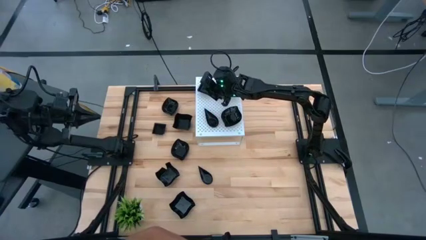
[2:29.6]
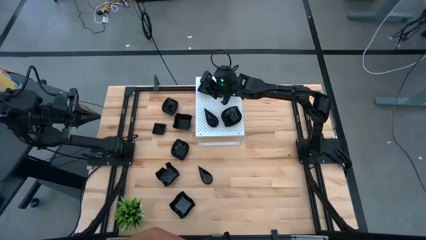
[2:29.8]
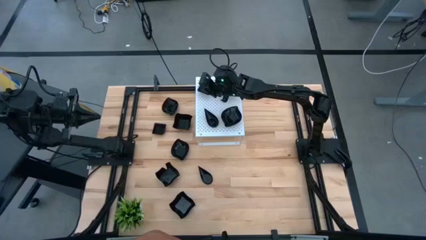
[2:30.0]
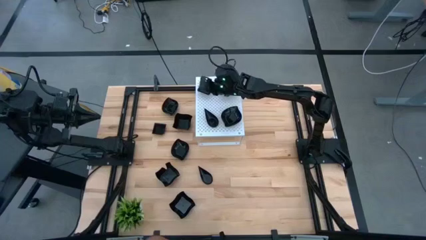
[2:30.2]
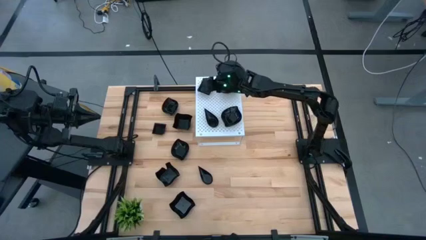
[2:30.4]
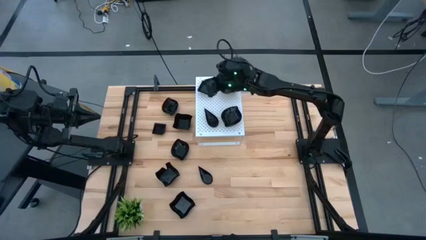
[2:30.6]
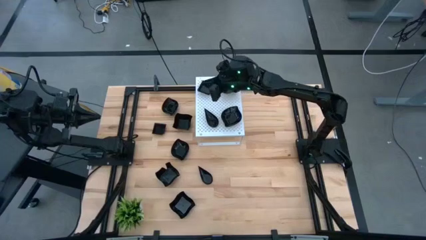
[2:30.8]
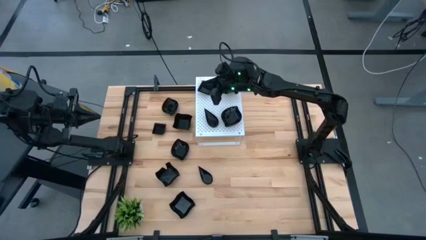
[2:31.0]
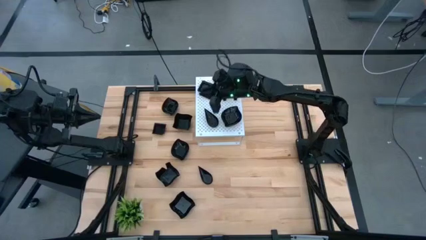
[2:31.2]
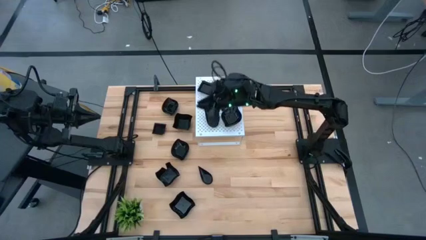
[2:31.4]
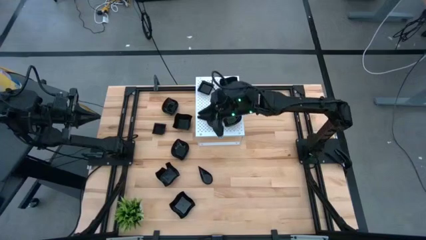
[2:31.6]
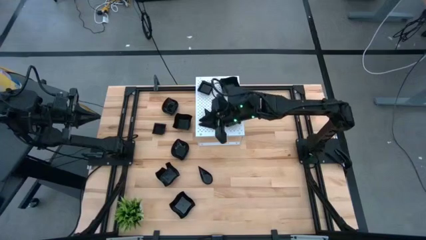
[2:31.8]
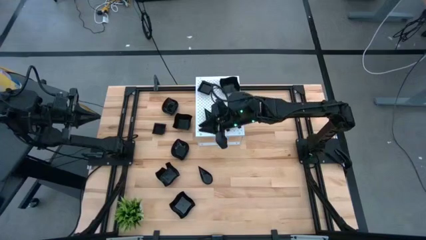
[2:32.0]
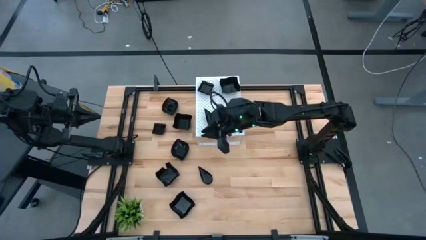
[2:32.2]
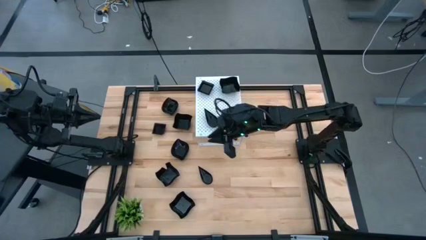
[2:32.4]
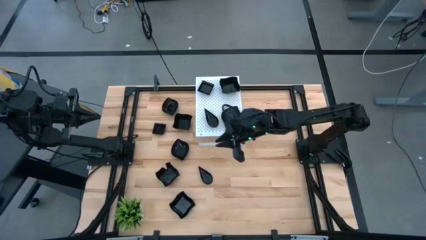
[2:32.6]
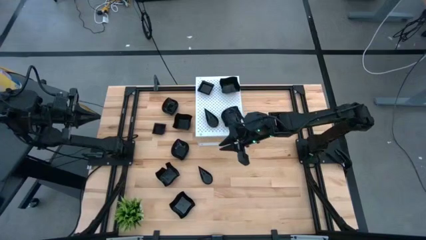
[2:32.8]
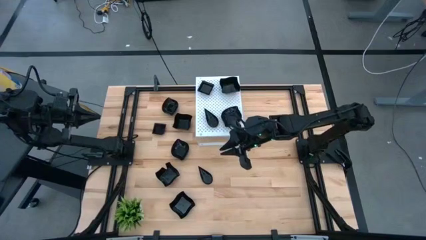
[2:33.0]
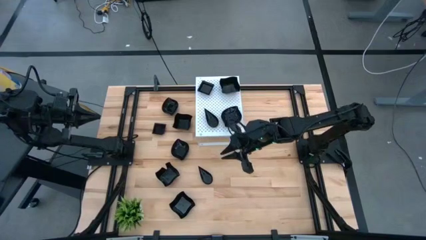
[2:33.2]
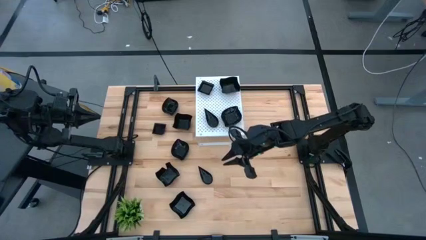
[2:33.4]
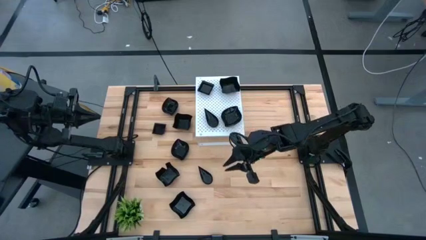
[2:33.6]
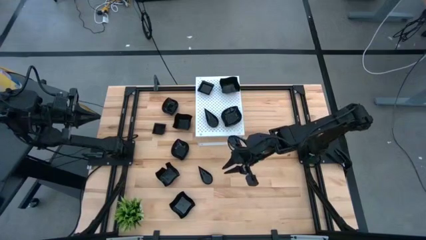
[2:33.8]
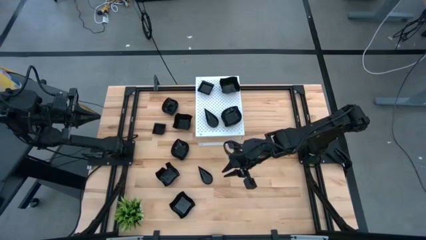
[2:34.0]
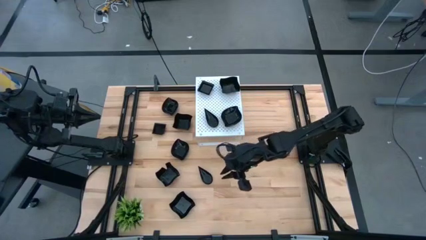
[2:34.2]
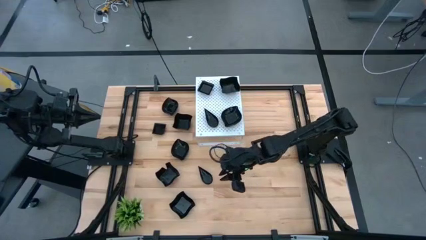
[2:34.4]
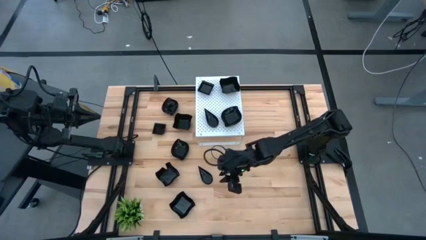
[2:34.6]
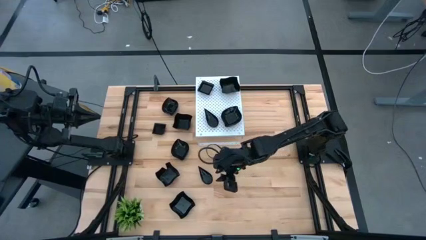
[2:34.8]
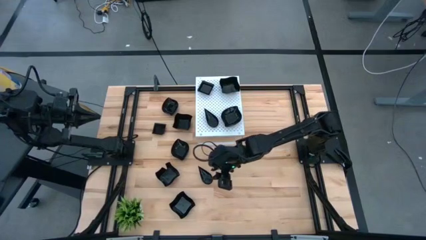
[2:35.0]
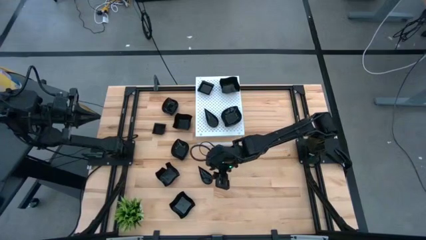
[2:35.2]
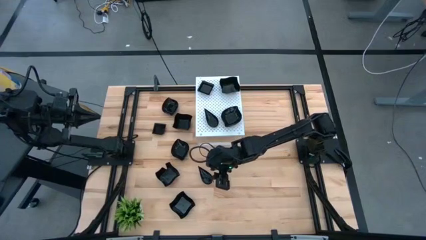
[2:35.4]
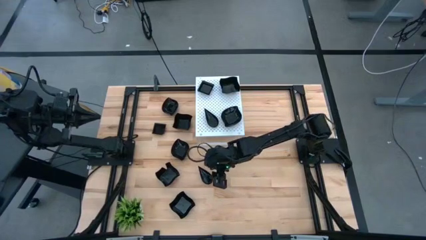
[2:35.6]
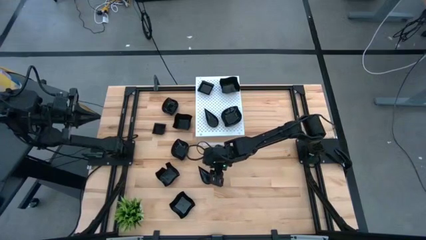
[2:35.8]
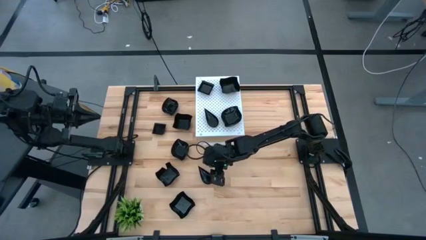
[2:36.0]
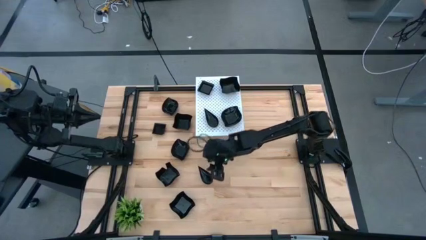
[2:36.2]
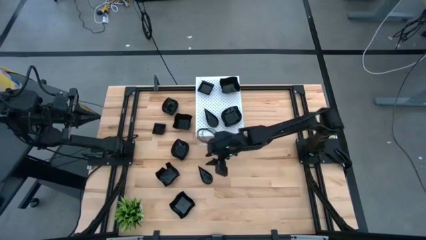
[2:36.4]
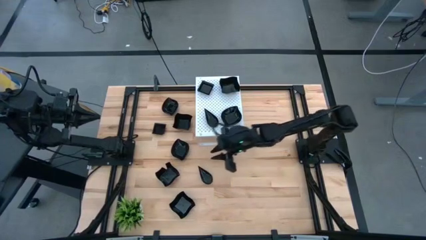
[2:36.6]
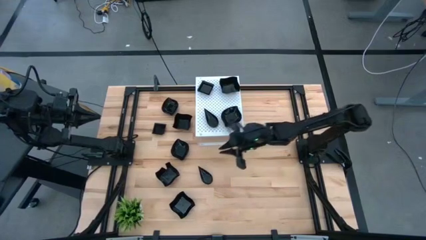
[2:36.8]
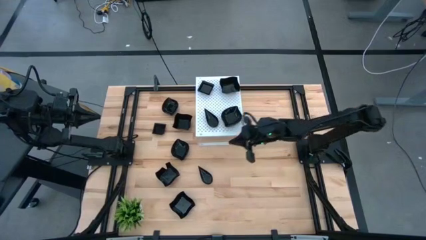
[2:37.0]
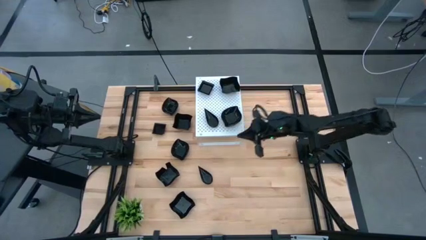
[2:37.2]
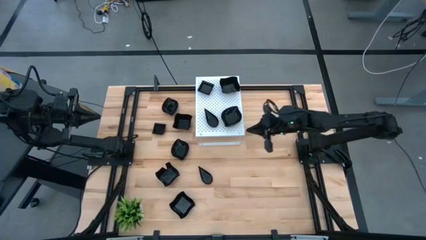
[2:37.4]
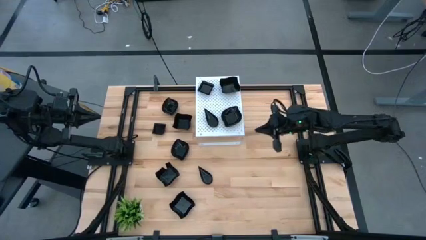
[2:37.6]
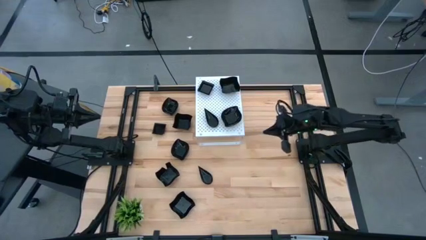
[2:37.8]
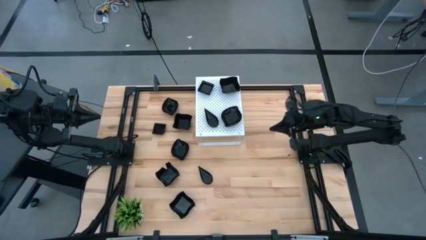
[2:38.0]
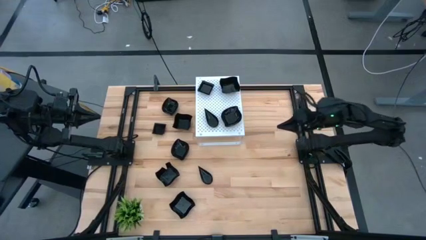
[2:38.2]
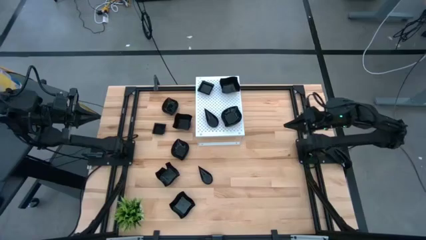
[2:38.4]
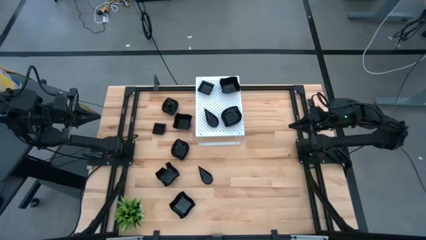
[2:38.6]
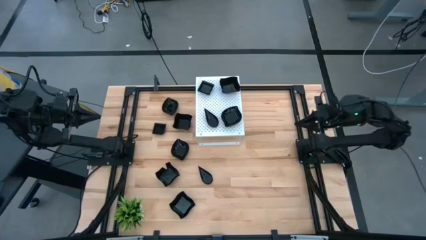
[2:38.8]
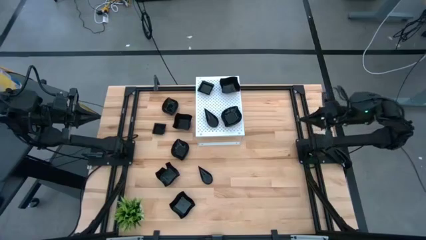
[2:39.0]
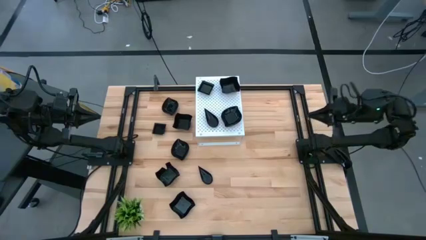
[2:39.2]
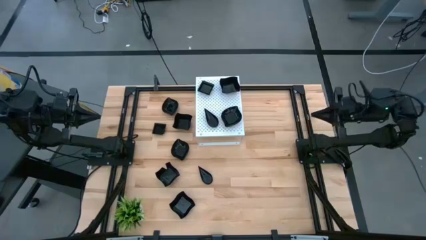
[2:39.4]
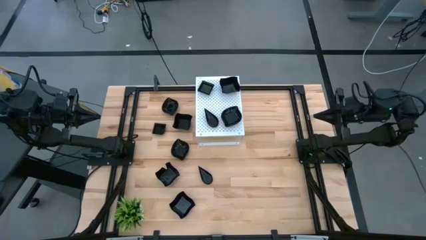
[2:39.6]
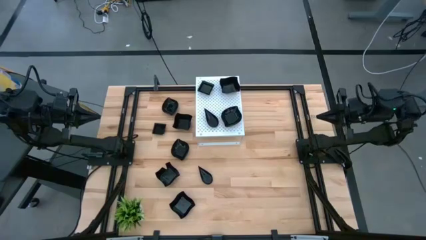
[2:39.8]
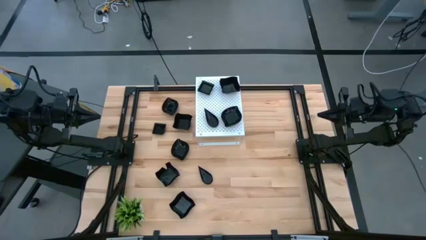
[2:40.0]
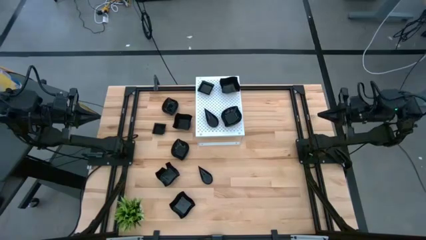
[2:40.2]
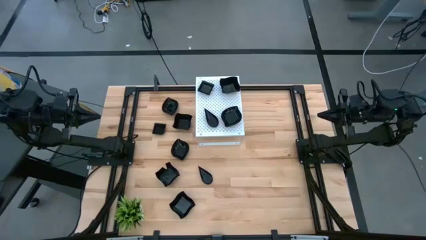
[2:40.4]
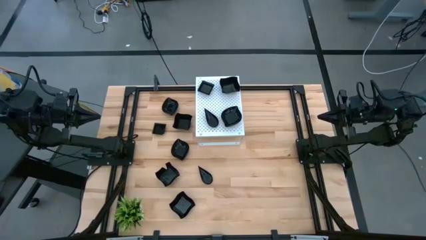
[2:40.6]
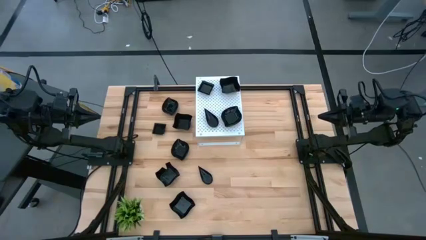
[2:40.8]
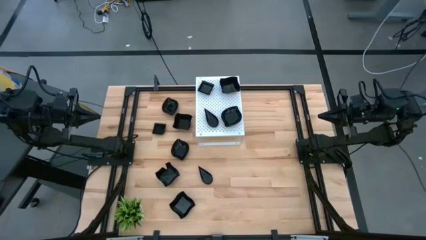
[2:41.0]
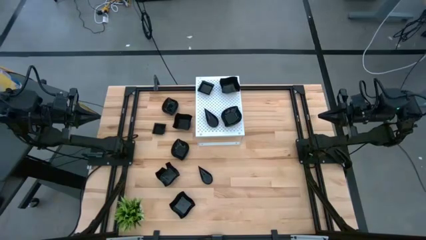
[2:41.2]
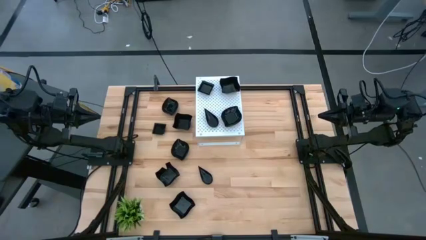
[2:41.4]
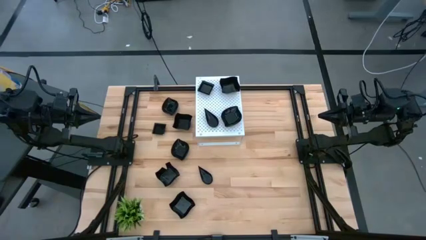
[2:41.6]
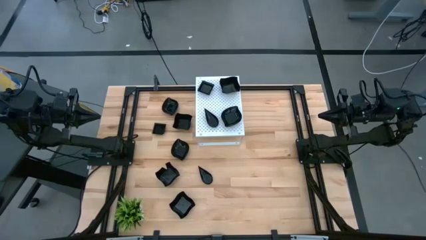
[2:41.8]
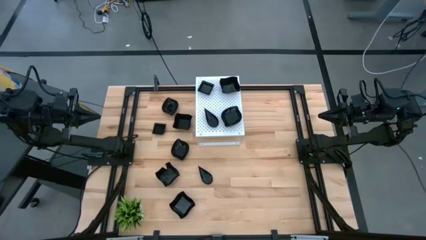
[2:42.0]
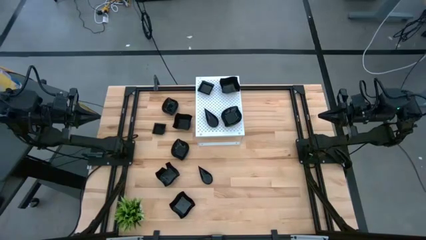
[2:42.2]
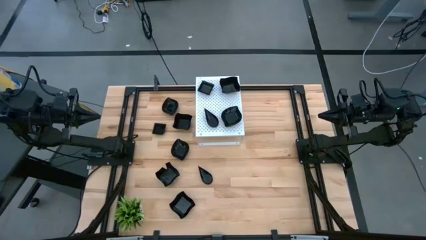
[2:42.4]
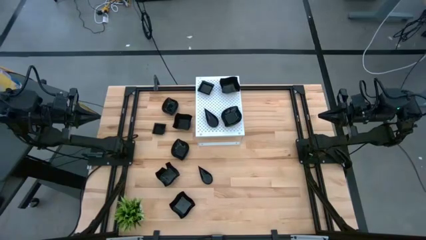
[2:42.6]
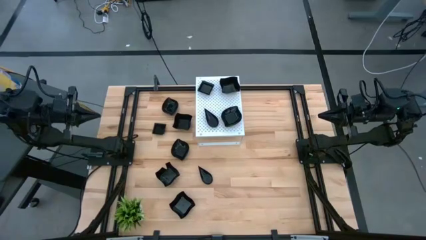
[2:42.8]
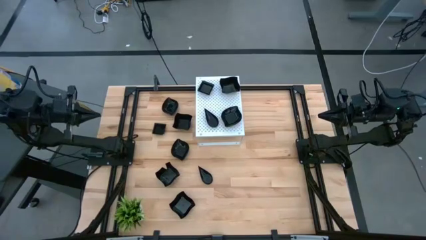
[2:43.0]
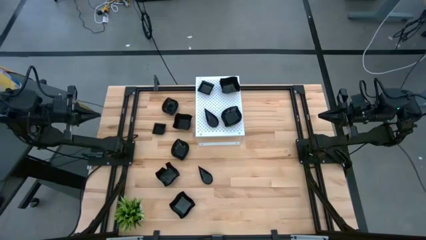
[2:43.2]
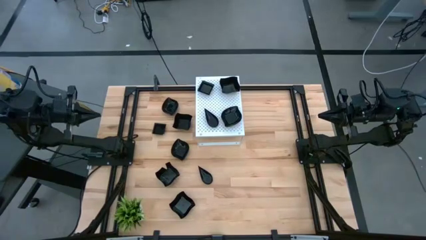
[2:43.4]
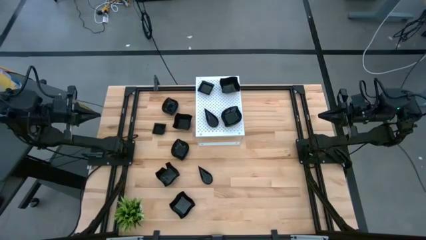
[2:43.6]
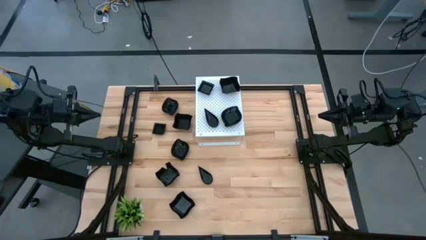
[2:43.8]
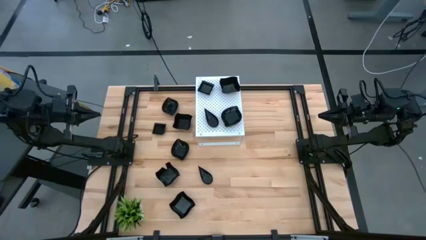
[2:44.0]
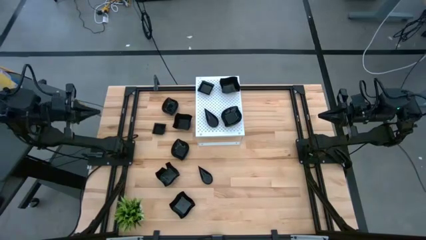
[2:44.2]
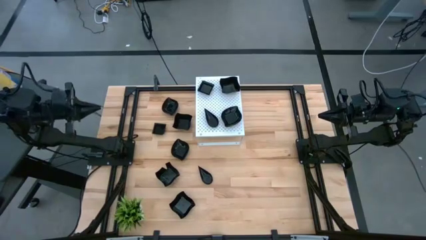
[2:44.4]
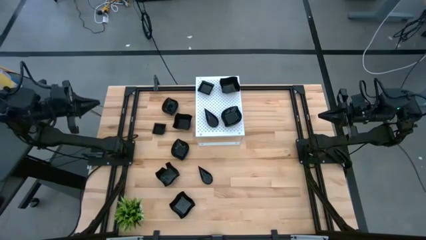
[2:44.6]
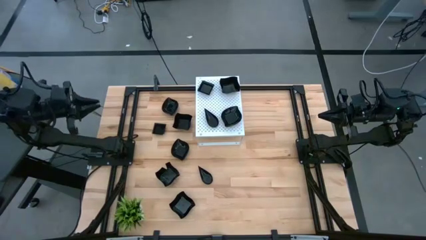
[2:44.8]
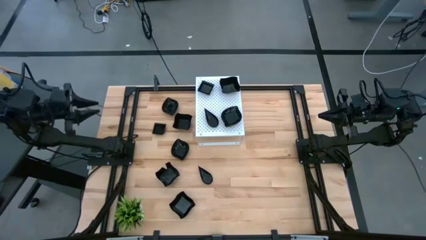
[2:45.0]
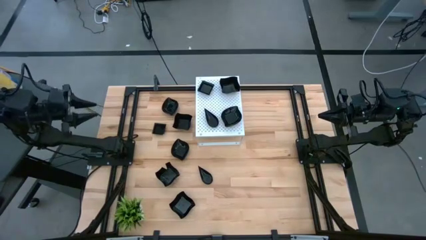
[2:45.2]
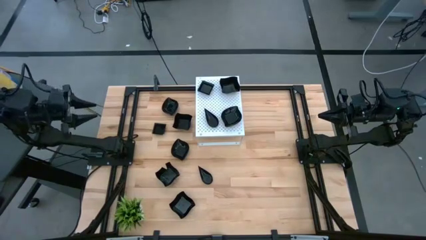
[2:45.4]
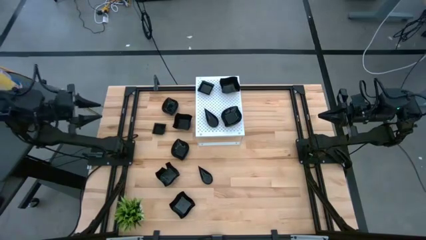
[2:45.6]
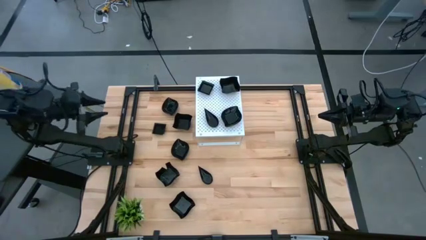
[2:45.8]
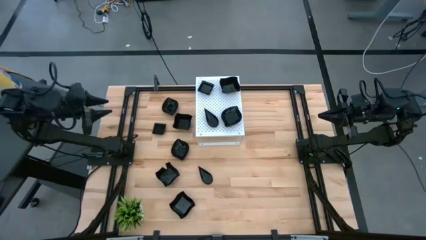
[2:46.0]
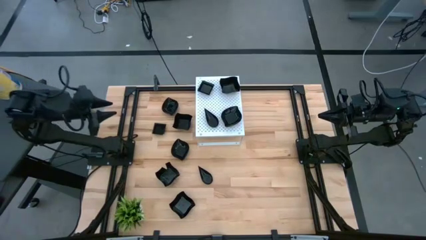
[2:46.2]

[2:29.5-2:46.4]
Task: Pick & Place Mini shaped plates
Stack the leaf-shaped plate on top of the leaf-shaped plate on the shelf
